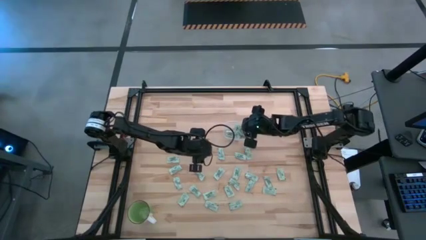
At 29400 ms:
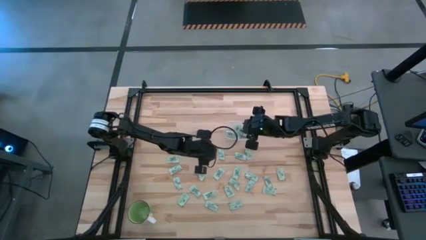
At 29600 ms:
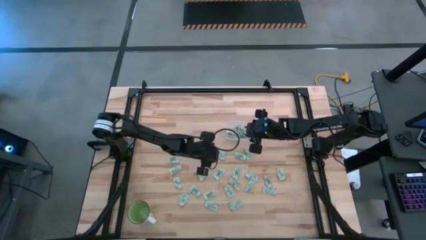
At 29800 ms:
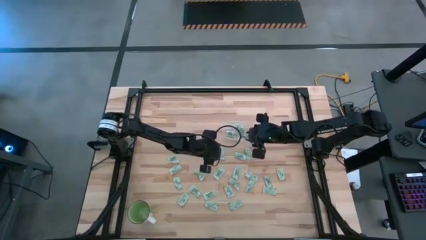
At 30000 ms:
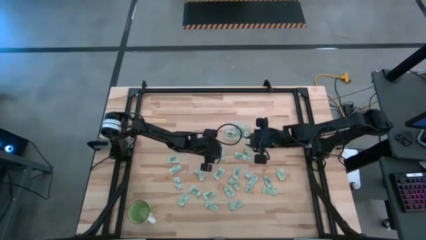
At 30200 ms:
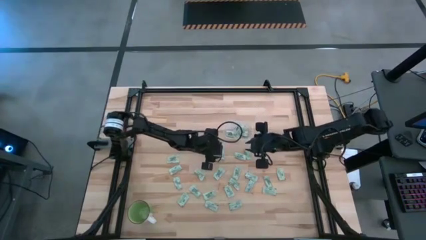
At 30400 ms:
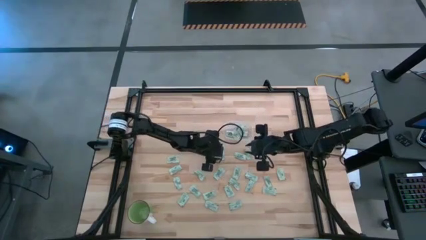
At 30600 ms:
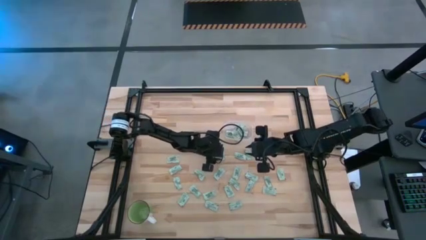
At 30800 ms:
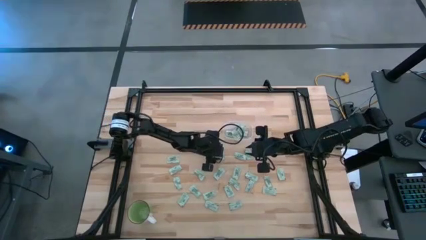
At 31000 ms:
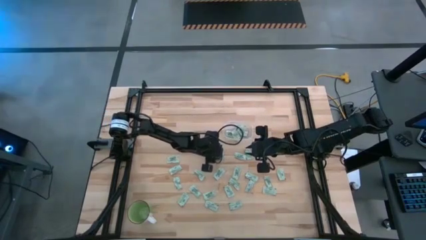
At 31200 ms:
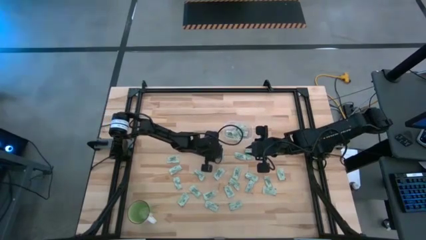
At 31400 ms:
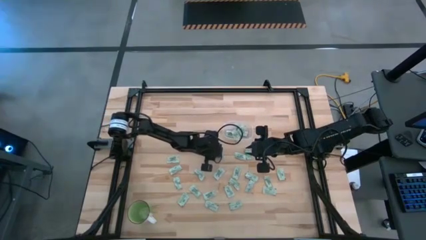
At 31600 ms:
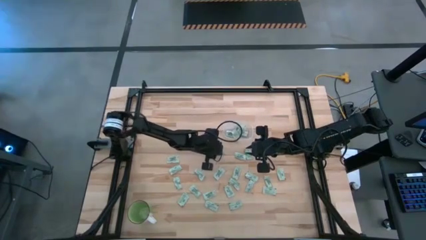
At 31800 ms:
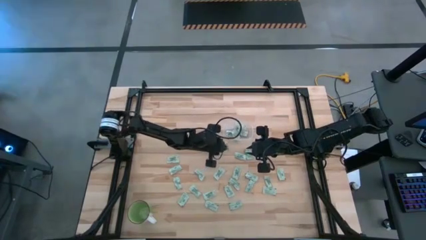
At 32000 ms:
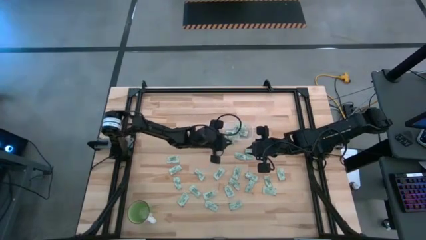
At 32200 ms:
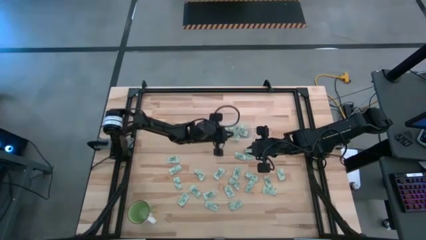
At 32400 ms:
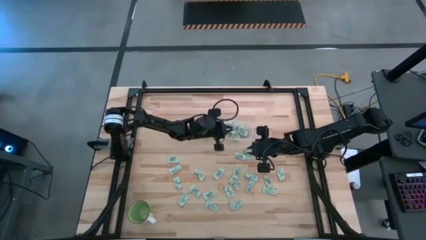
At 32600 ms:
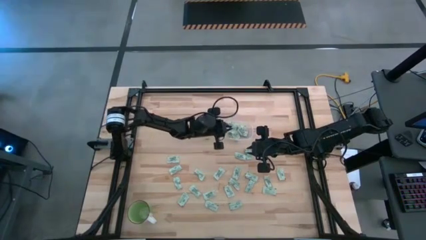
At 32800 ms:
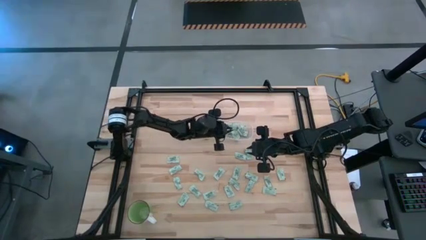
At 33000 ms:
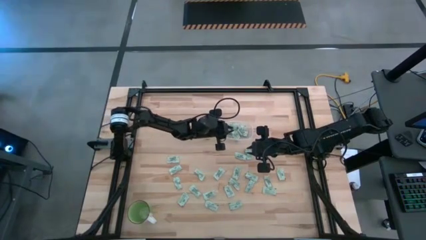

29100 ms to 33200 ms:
Task: Pick and place Stevia / Truvia into bins
Put the stevia packet into the transparent bin

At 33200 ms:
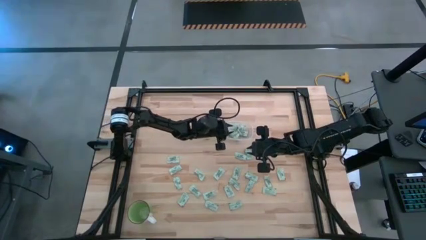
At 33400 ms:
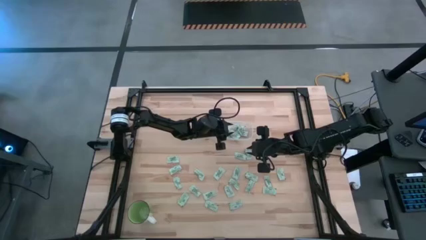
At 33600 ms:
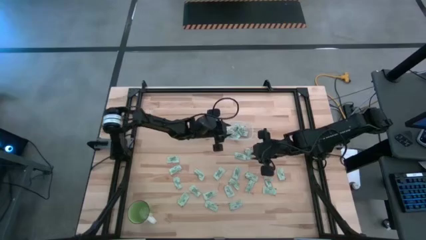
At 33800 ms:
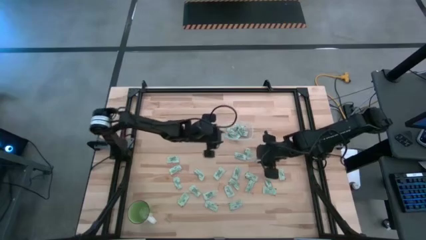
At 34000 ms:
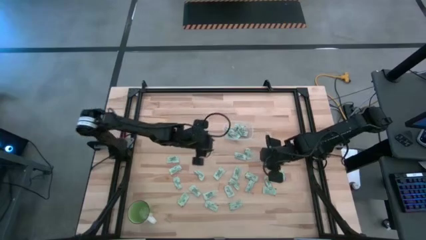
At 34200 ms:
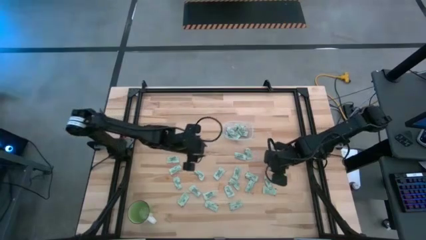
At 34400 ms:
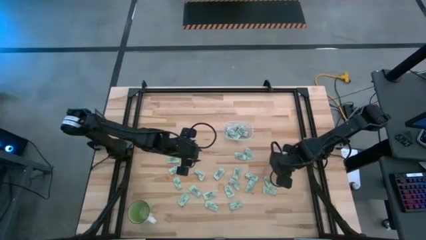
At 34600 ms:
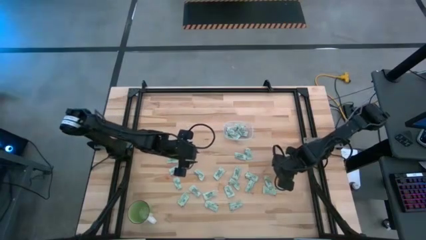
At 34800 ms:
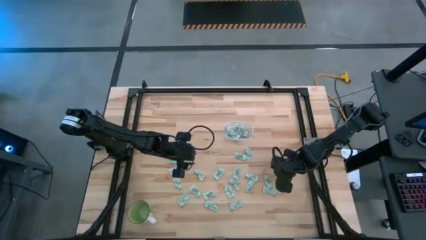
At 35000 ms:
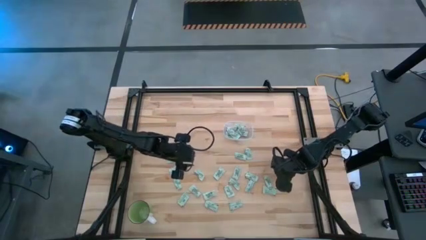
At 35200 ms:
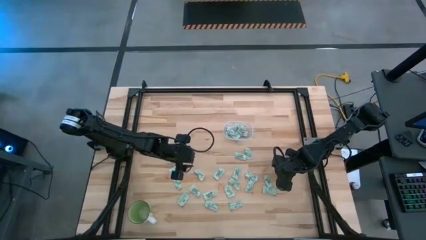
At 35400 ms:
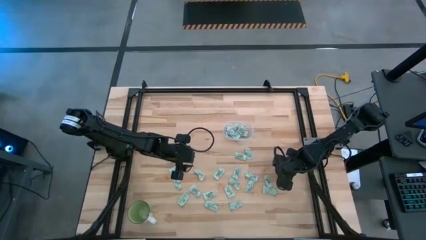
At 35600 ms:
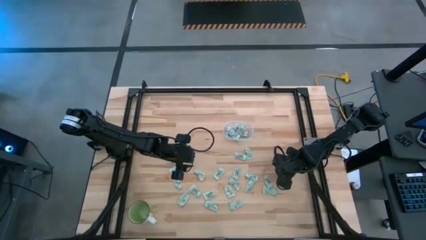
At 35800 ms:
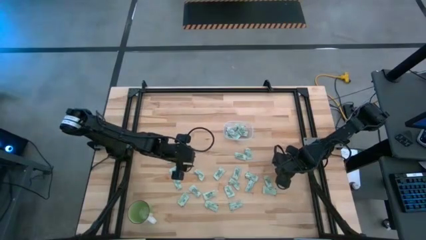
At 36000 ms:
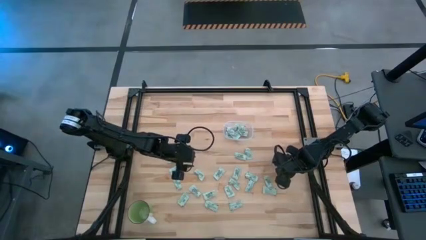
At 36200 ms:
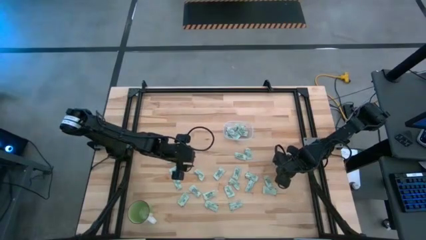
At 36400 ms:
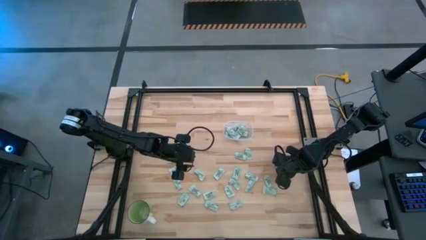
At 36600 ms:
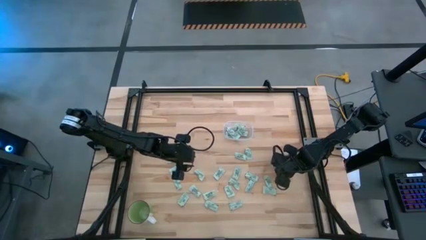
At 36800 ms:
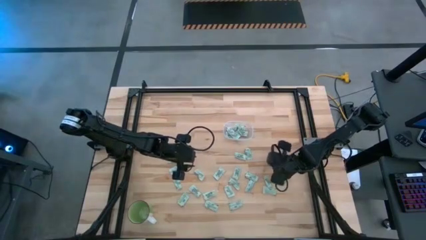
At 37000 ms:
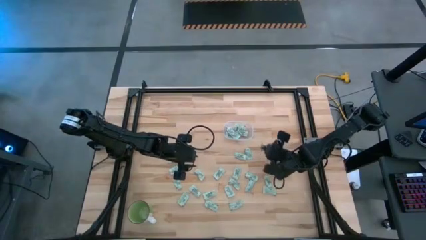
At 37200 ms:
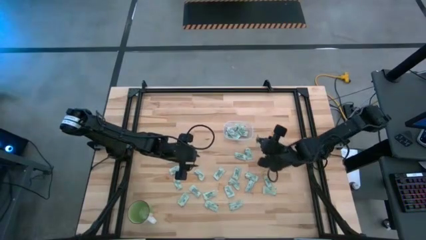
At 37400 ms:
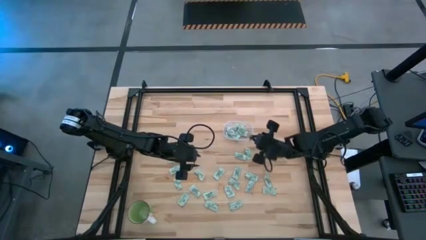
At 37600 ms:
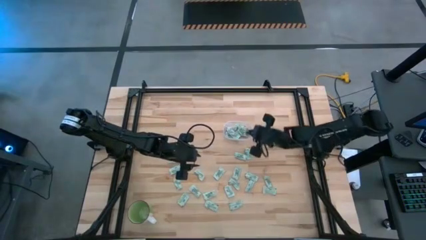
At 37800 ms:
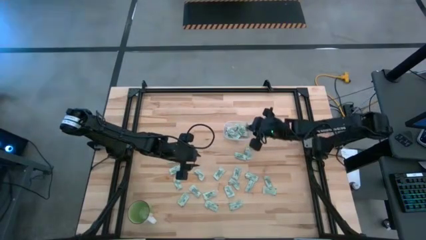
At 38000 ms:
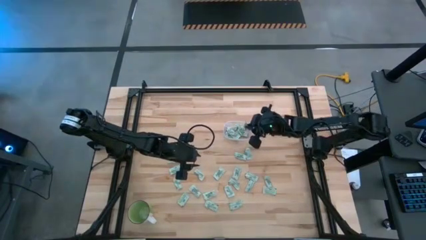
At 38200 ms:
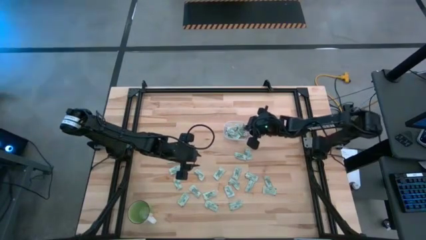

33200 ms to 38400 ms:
Put the stevia packet into the transparent bin

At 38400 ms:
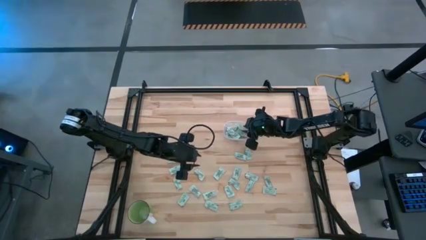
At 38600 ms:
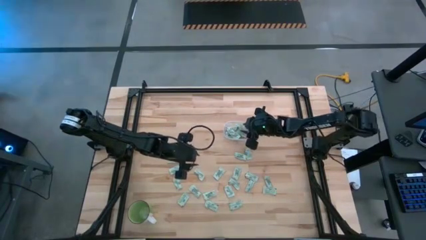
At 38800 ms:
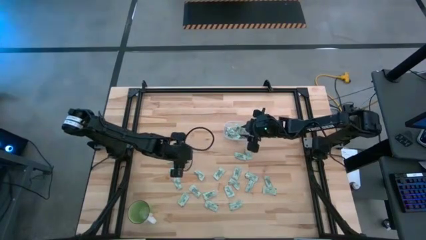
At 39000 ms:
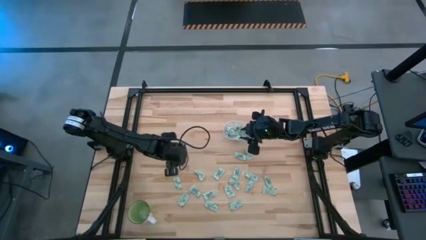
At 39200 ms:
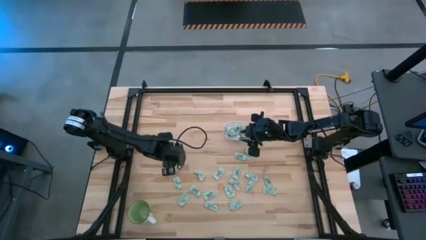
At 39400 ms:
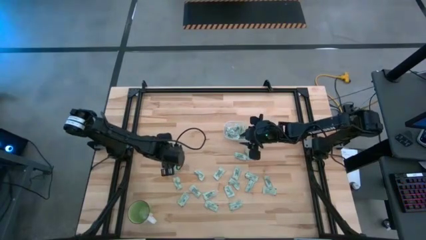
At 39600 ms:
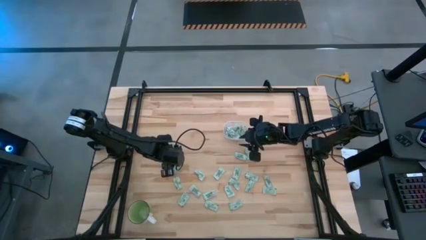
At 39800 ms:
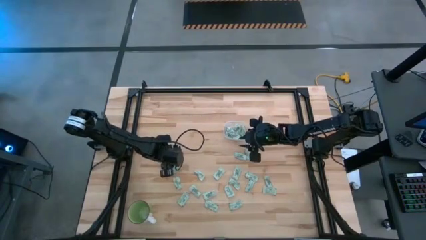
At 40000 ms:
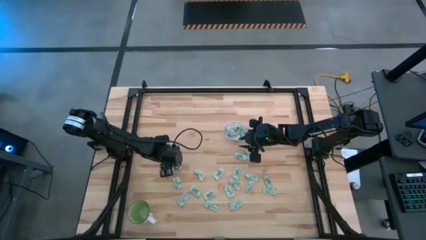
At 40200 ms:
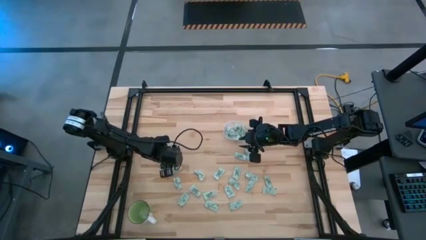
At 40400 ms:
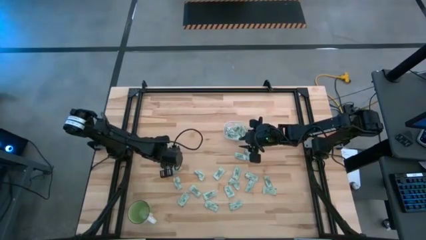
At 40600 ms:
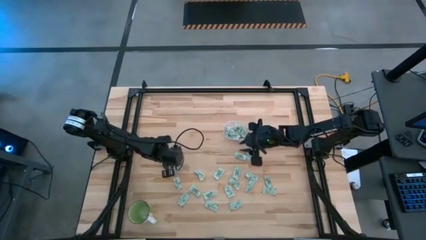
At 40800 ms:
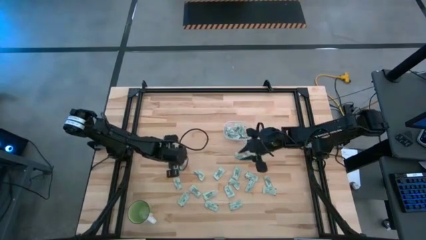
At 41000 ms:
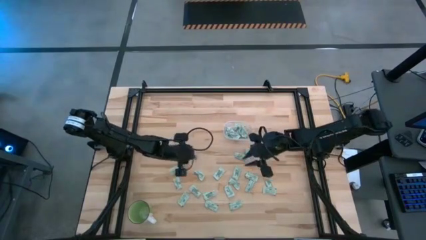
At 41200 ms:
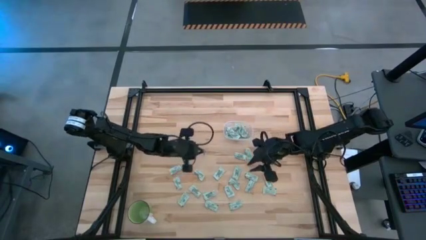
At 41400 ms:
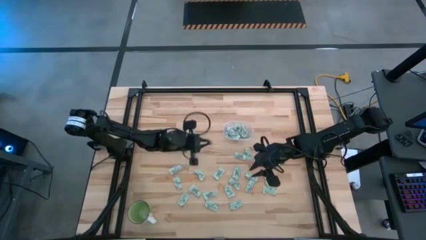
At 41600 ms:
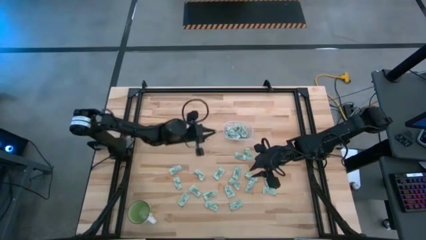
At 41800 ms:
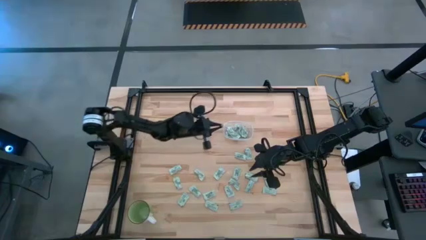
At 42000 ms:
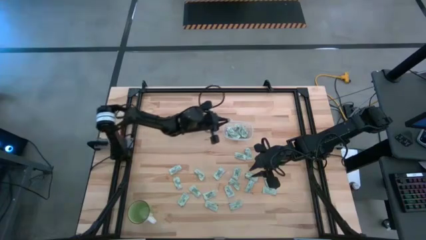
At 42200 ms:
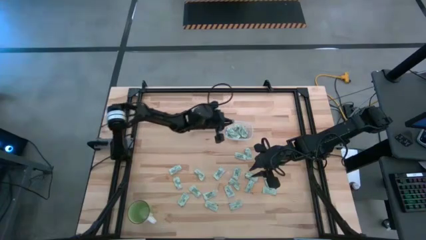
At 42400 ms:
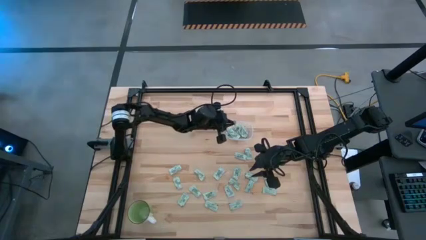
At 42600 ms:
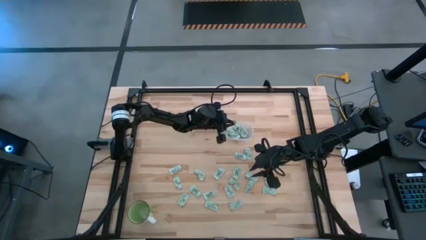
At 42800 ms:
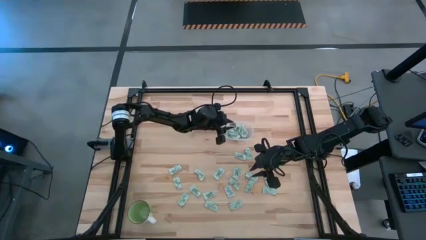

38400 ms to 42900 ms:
Put the stevia packet into the transparent bin

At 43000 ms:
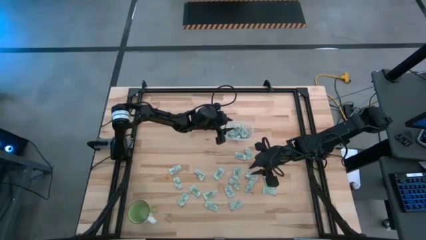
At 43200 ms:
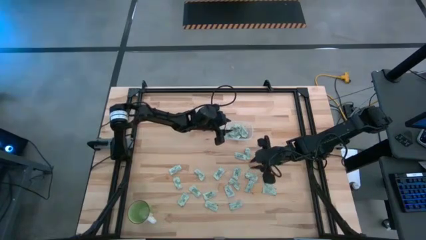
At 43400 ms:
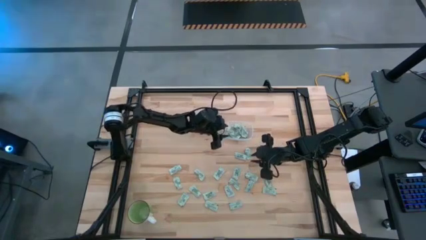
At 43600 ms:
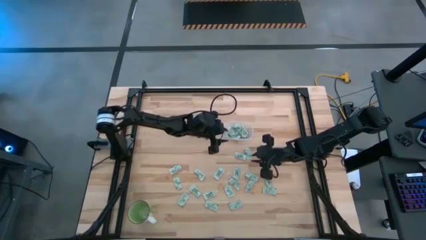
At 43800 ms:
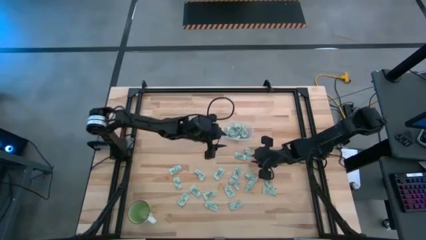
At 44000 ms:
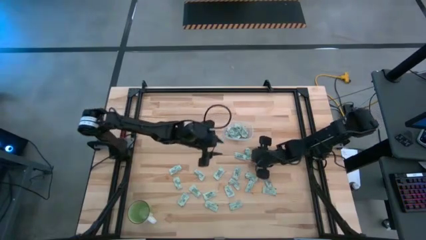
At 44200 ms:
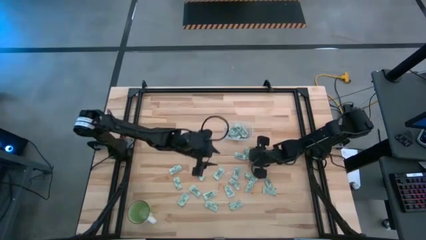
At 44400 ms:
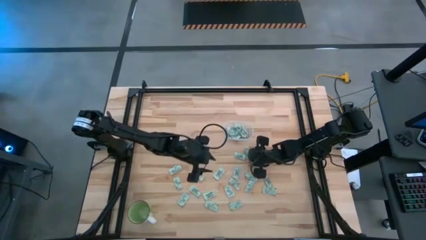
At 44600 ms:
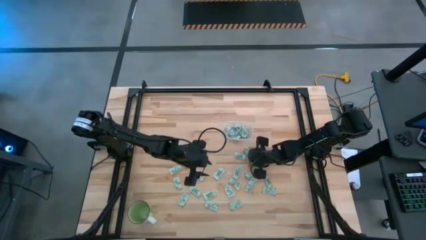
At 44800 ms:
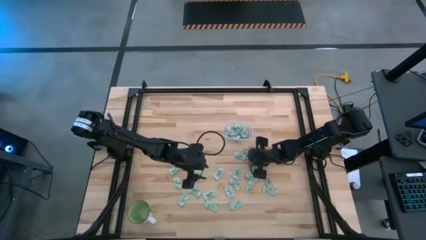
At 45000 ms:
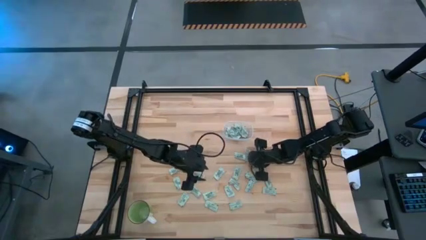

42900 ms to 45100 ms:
Put the stevia packet into the transparent bin

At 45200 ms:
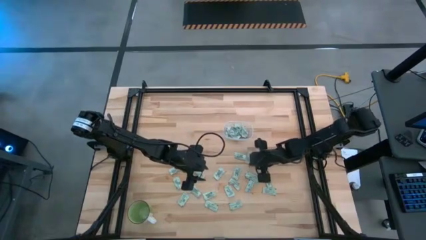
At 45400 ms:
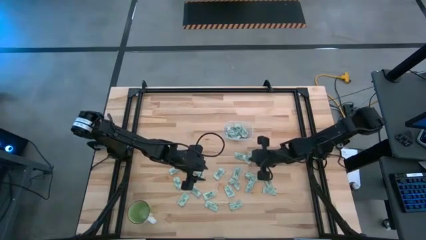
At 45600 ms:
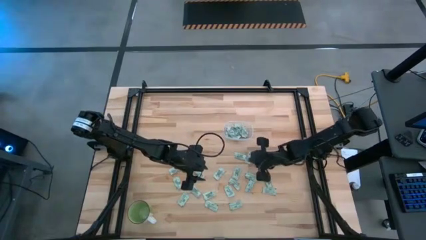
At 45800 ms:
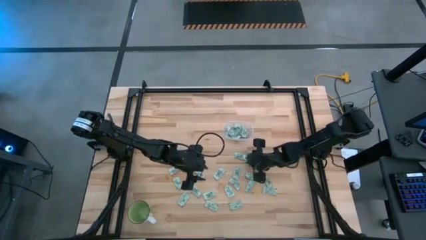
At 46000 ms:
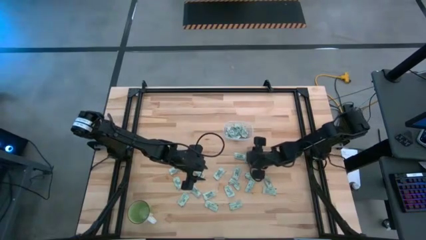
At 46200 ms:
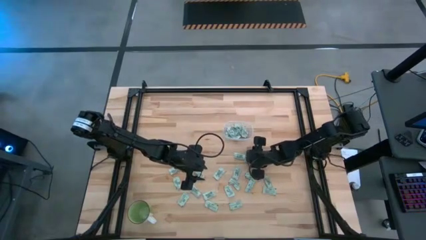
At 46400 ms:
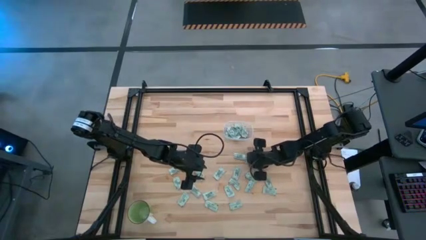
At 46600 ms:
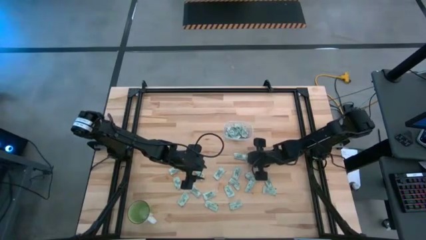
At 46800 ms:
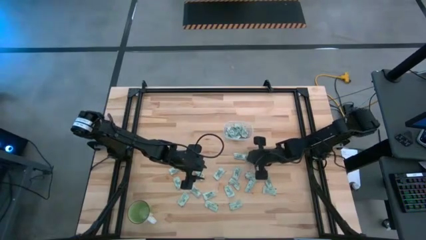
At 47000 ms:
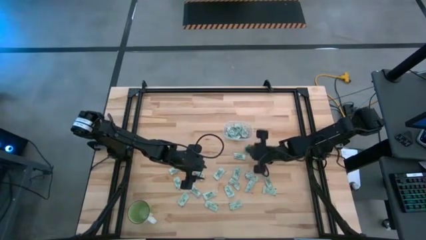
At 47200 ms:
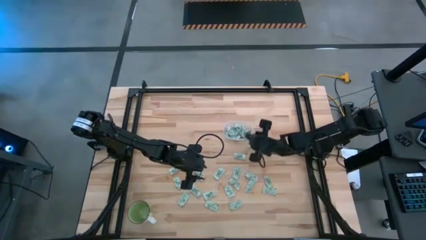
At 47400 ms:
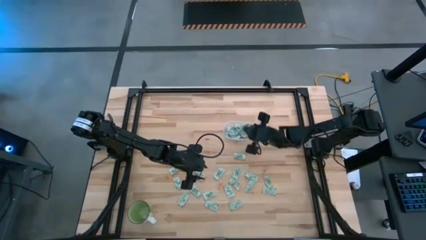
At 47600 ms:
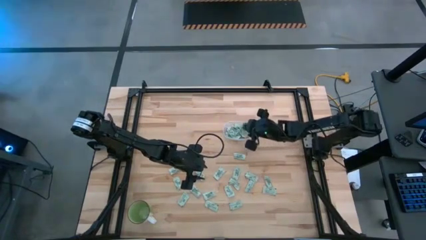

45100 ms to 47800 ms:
Put the stevia packet into the transparent bin
